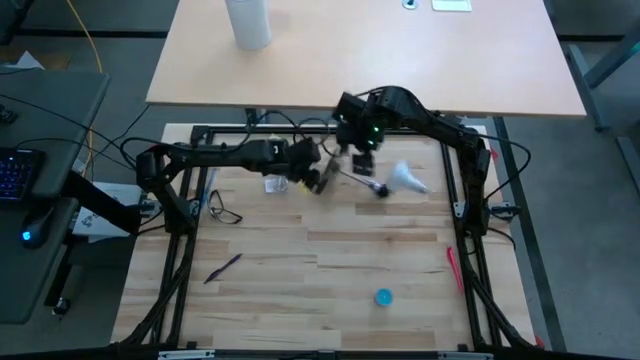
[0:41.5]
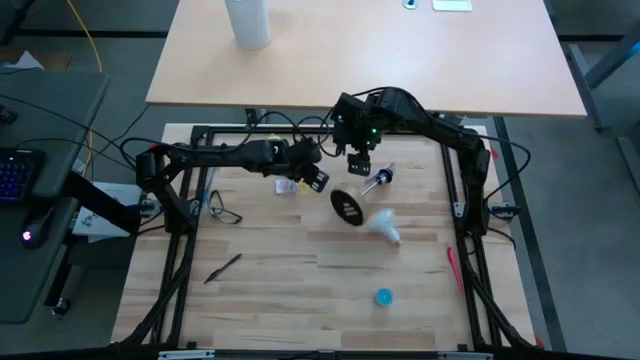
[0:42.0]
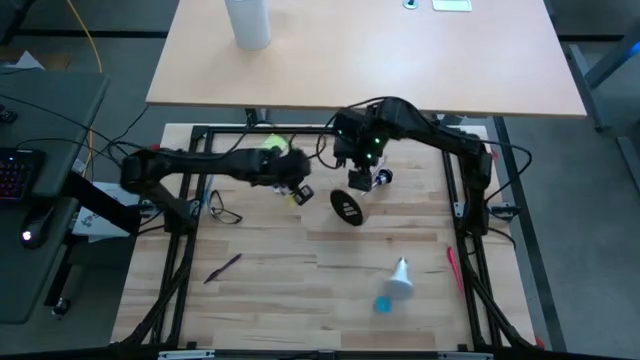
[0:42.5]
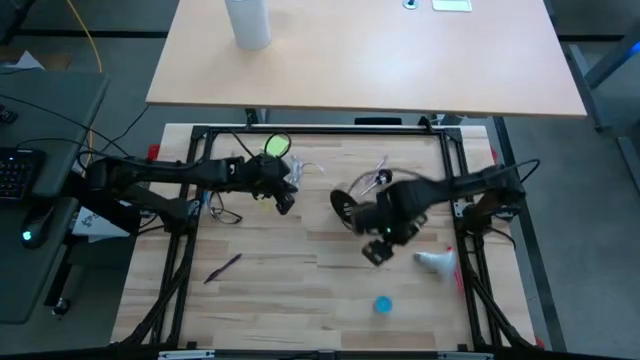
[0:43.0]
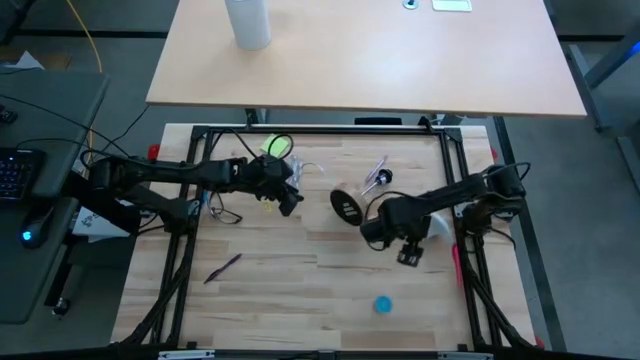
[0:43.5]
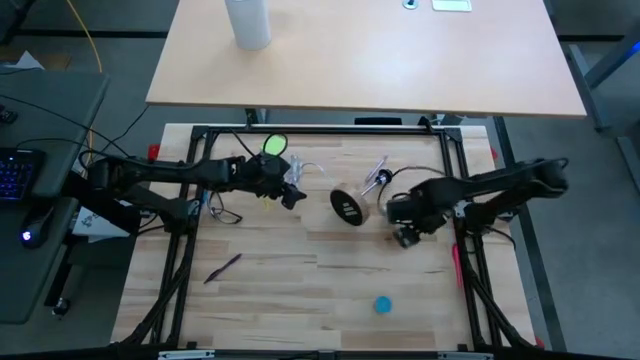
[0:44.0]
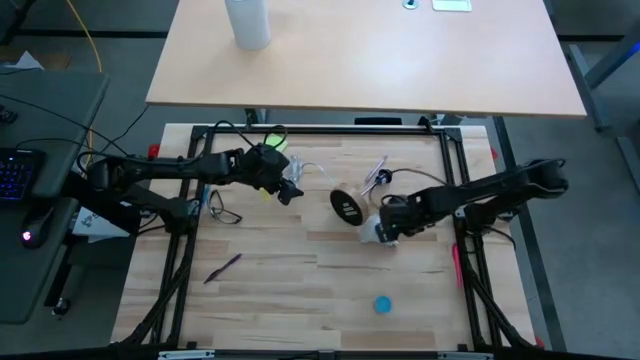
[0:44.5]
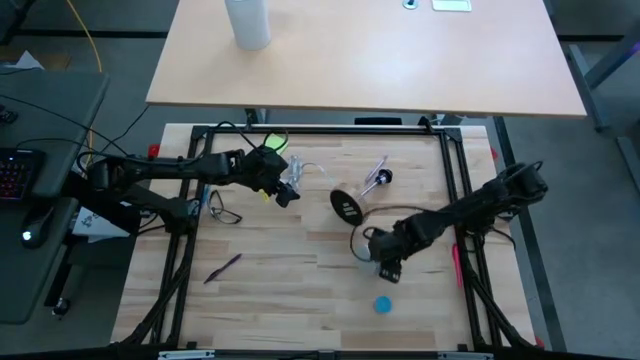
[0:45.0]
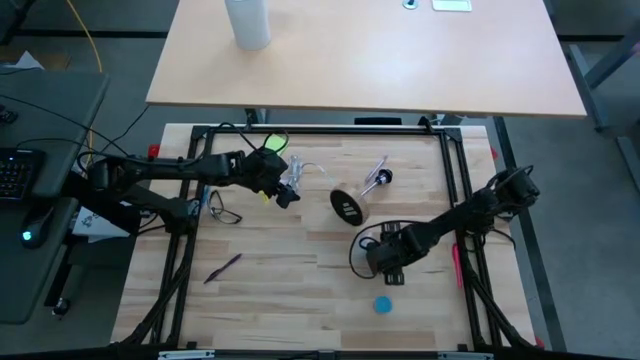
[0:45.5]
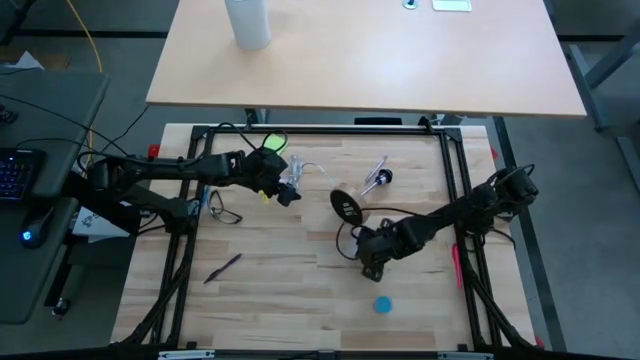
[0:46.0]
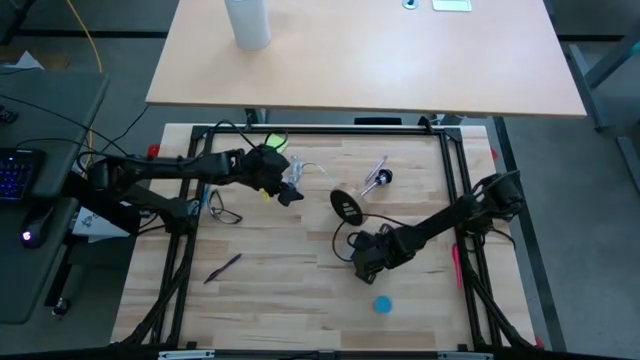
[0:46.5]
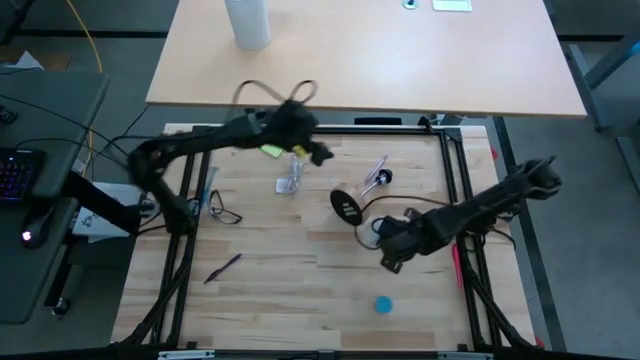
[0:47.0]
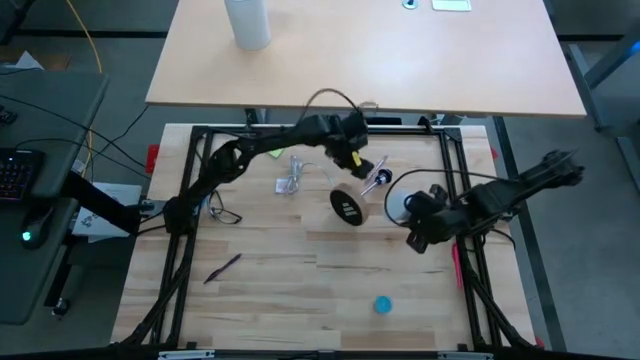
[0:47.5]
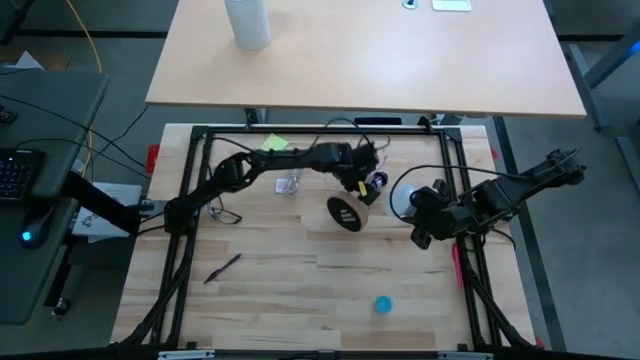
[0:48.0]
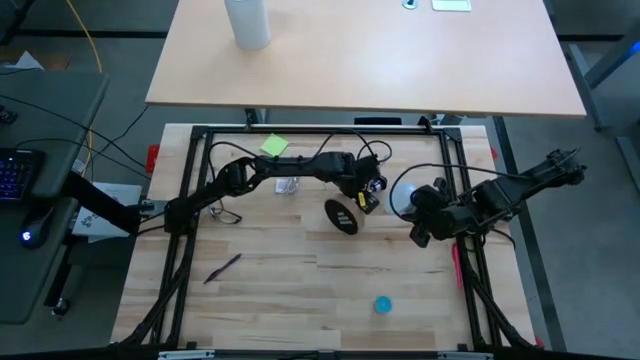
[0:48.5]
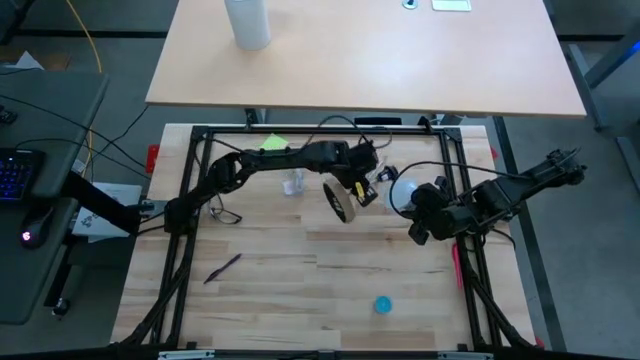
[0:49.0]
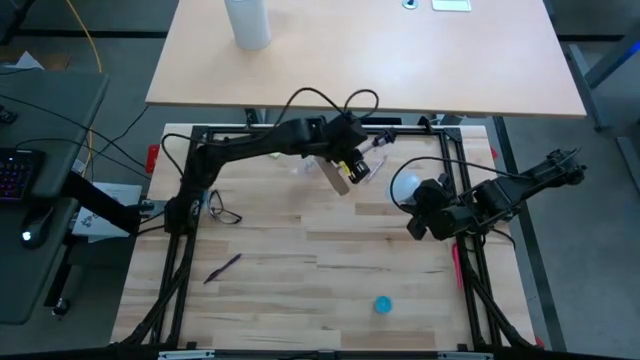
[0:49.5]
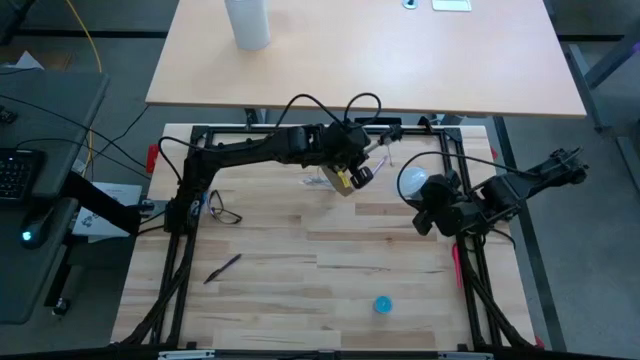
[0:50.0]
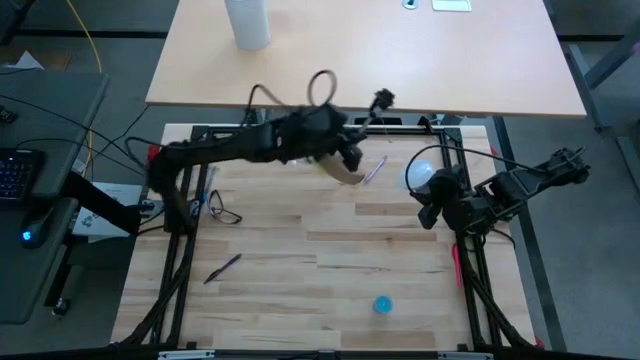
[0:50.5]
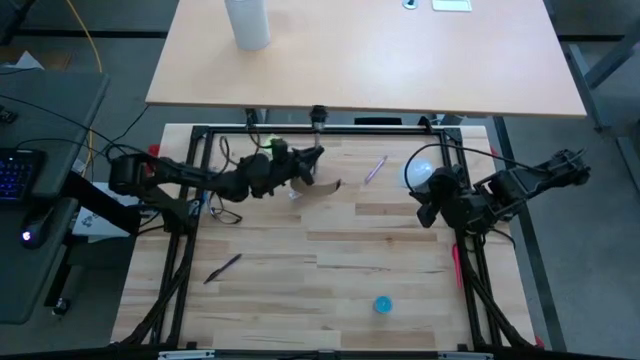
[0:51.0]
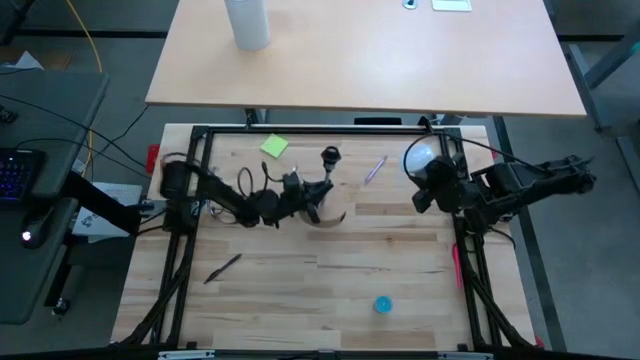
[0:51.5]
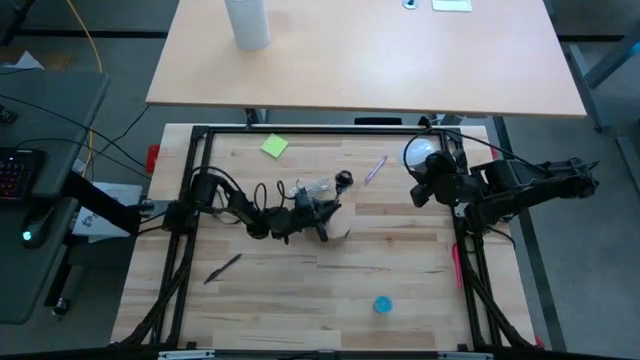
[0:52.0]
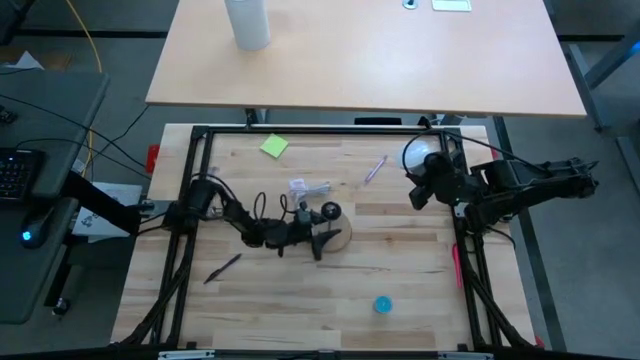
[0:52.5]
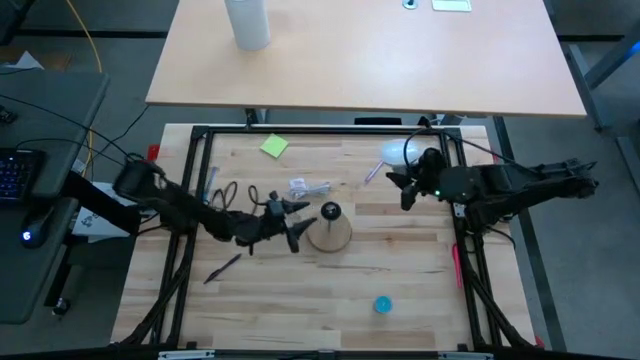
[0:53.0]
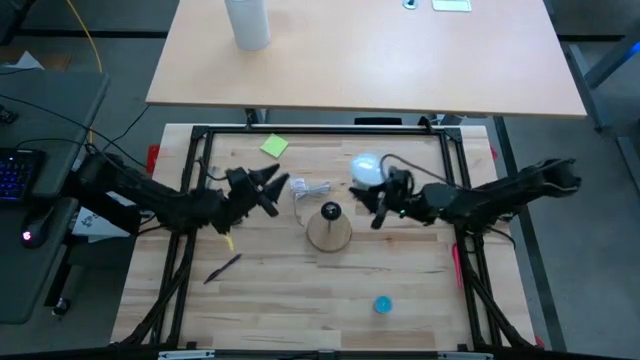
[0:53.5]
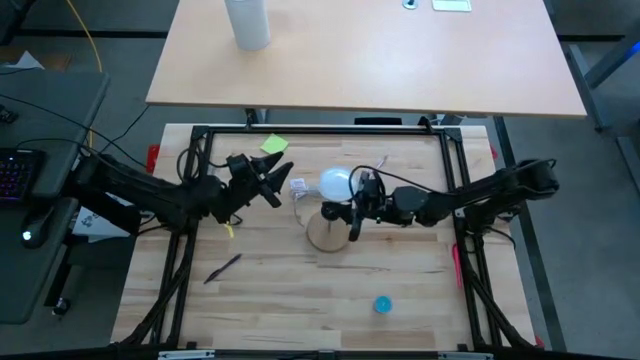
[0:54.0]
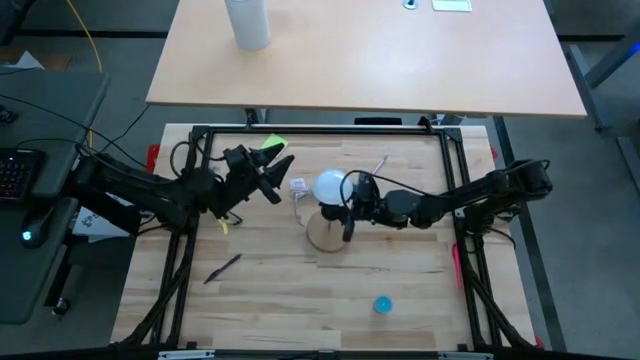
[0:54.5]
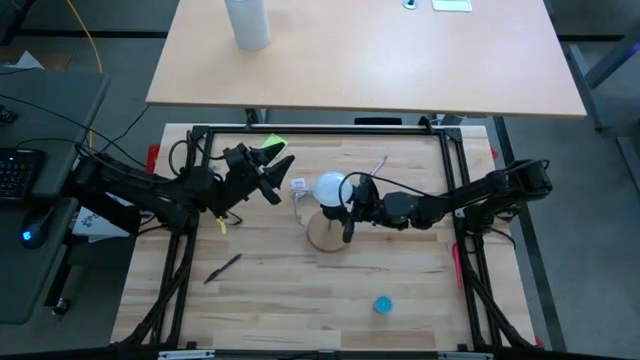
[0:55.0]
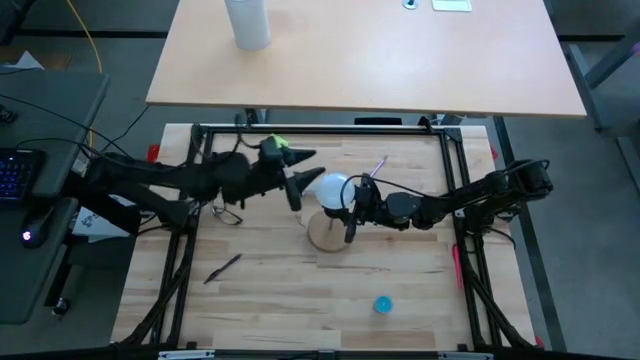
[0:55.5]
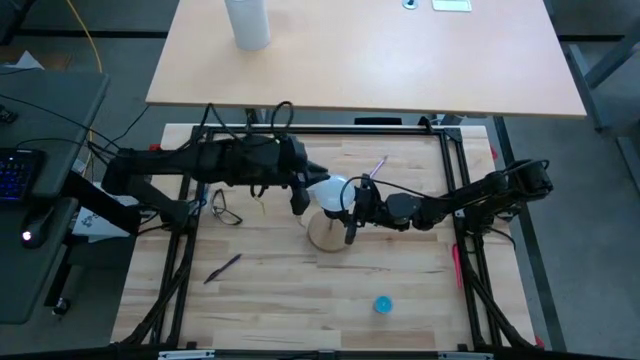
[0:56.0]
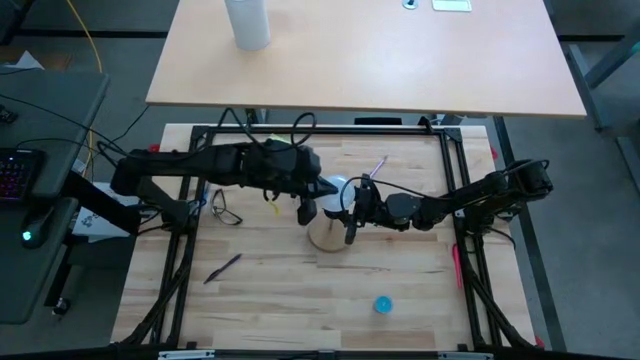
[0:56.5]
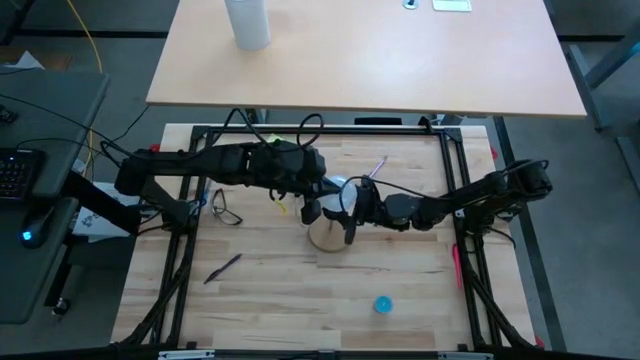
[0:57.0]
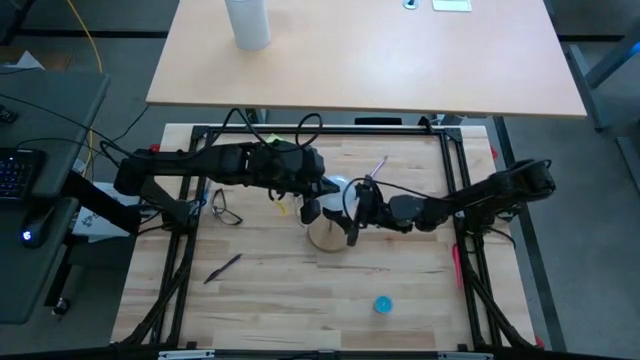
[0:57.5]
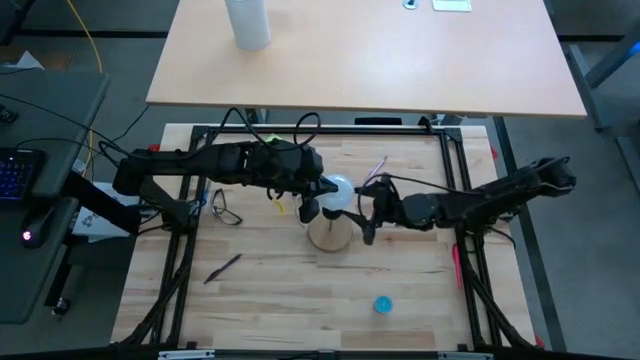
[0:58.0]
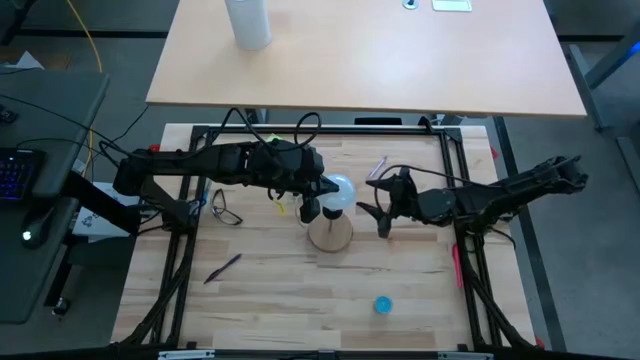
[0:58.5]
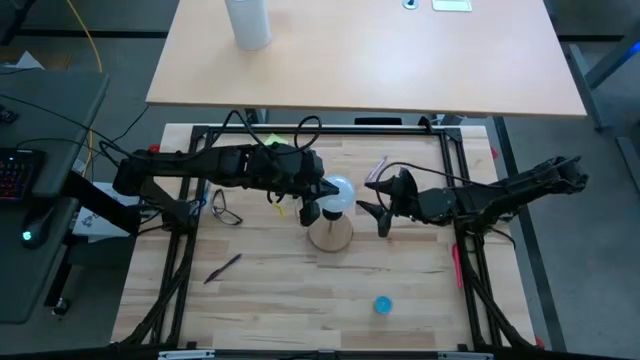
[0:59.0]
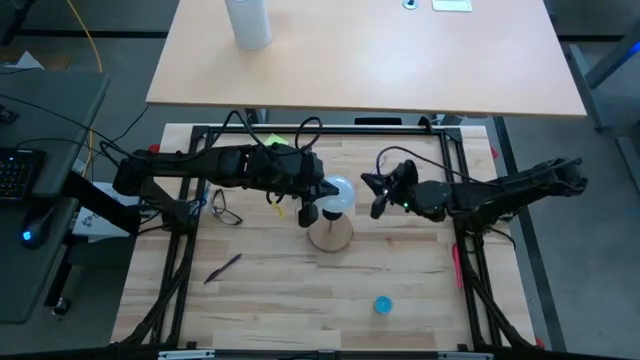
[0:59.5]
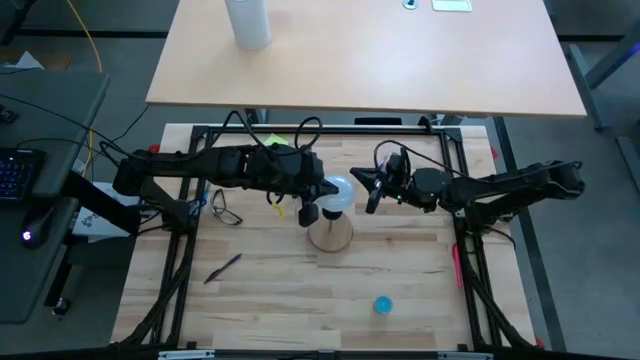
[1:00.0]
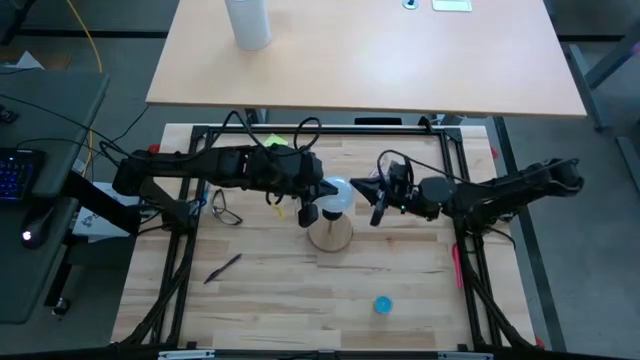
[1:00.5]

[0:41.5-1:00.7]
Task: Screw lightbulb
Insert the lightbulb into the lamp

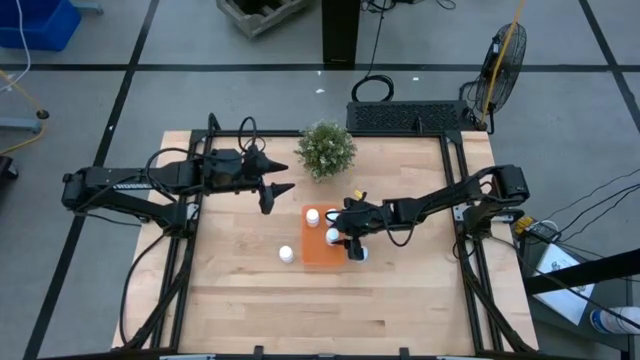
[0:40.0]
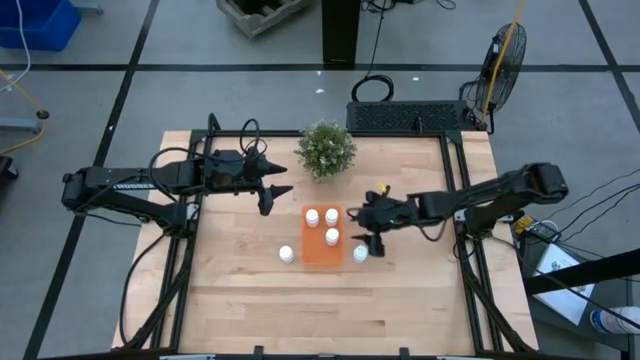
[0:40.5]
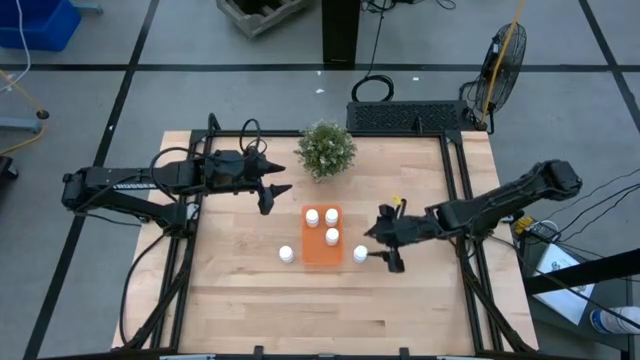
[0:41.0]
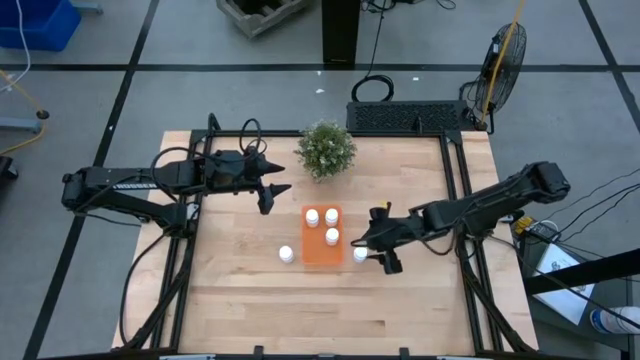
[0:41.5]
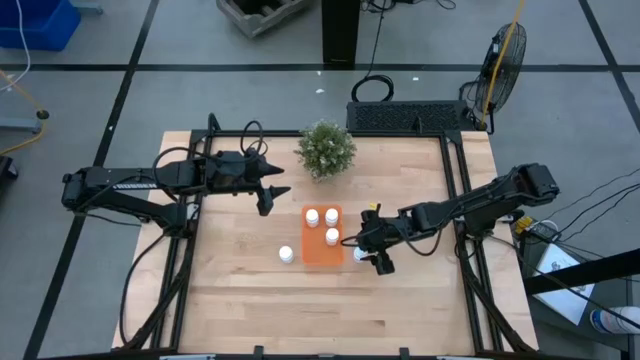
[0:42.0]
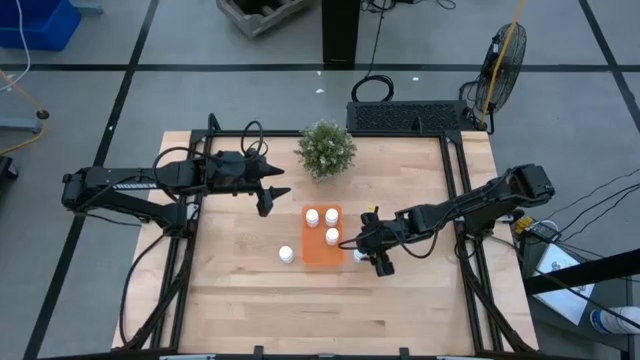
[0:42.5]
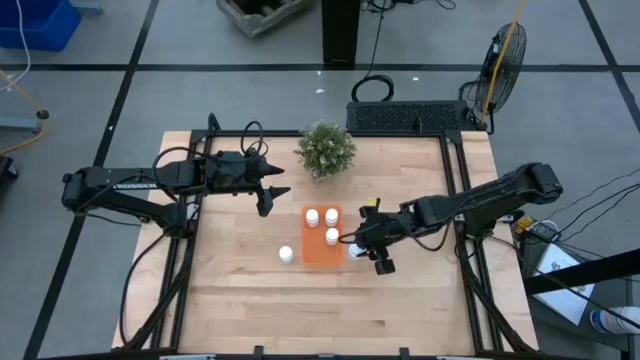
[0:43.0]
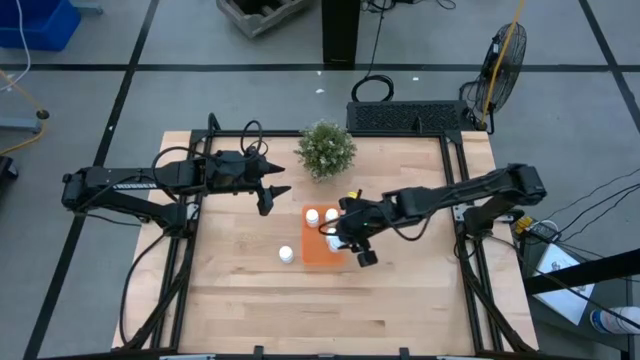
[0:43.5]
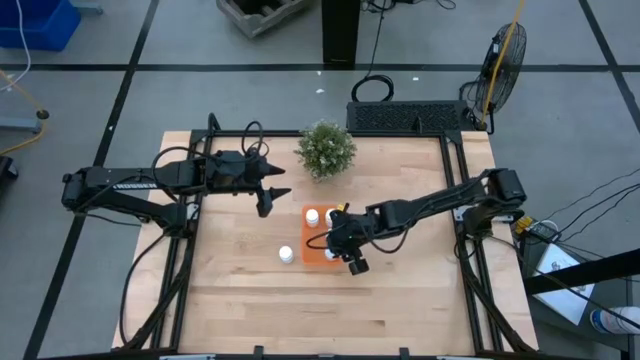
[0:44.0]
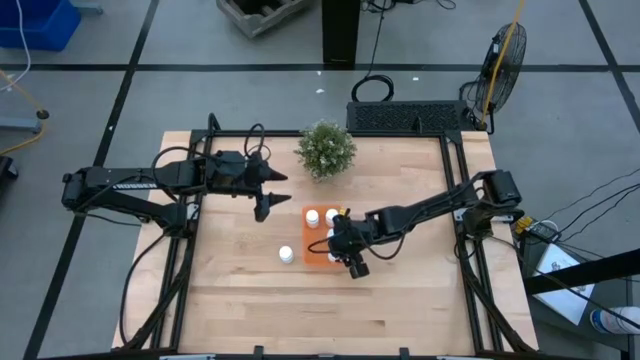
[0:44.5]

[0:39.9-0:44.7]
Task: Pick and place pill bottles into a basket
Put the white medicine bottle into the orange bin
